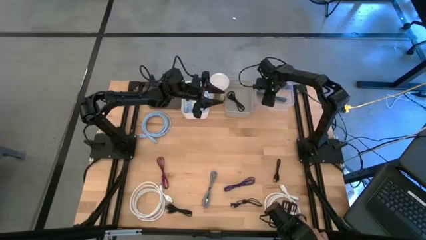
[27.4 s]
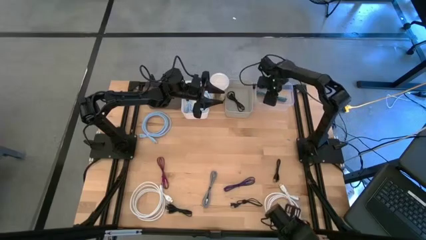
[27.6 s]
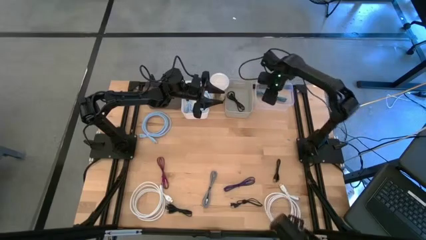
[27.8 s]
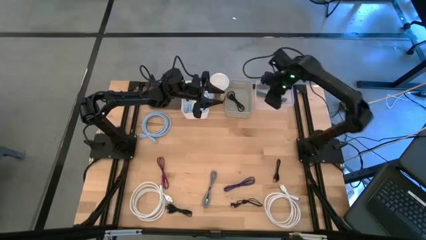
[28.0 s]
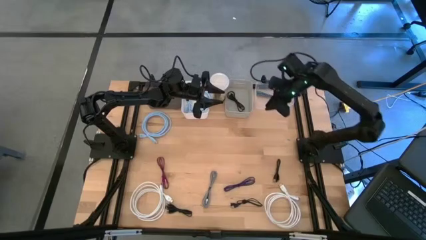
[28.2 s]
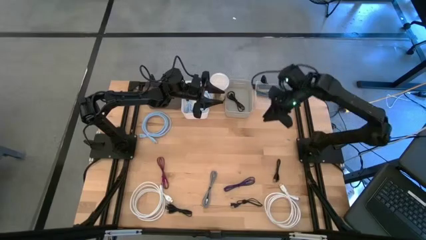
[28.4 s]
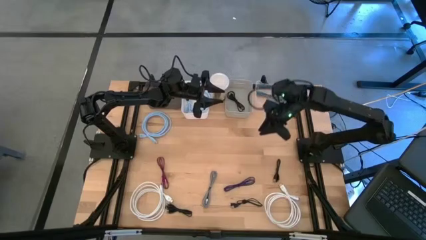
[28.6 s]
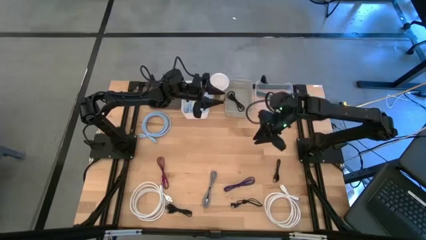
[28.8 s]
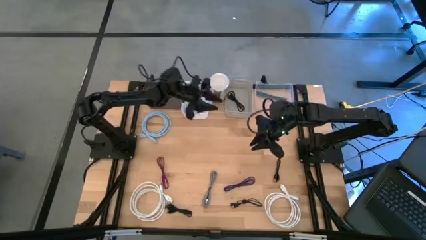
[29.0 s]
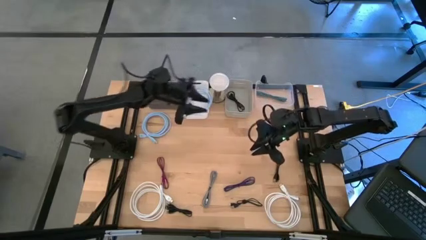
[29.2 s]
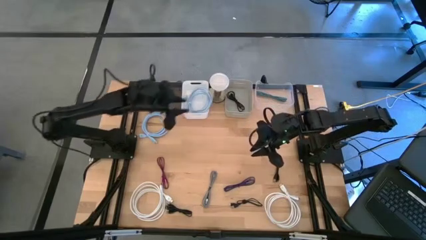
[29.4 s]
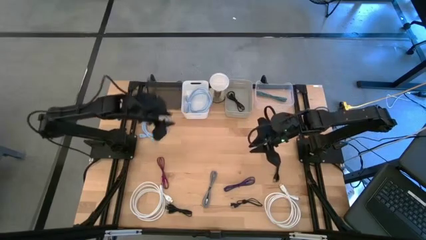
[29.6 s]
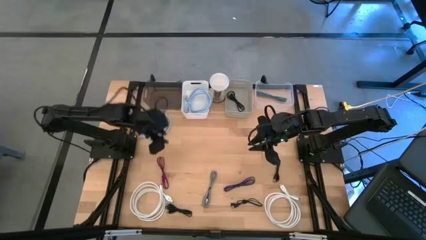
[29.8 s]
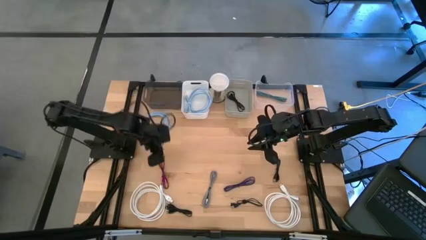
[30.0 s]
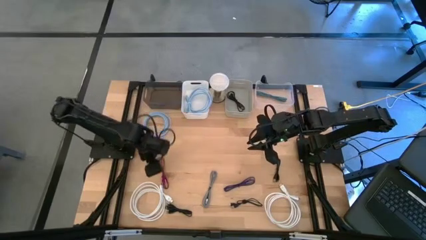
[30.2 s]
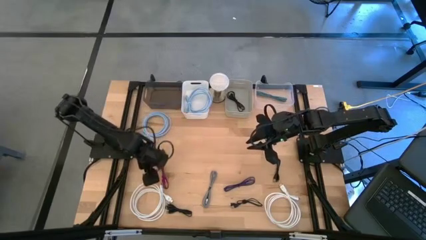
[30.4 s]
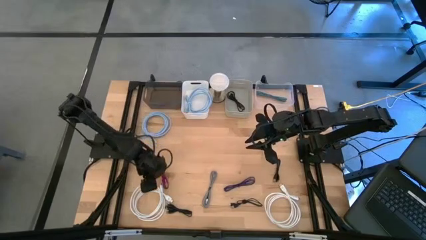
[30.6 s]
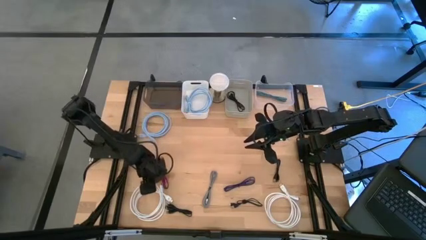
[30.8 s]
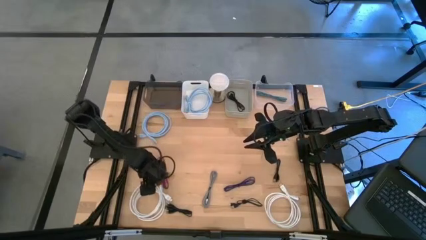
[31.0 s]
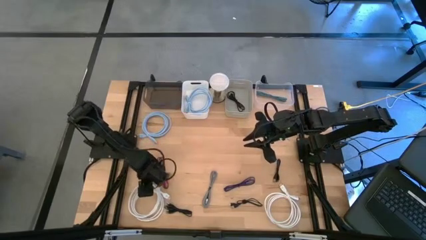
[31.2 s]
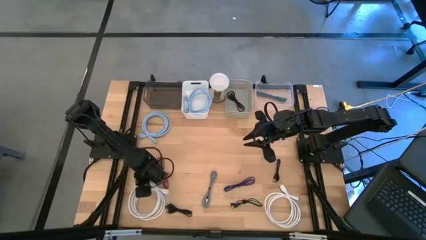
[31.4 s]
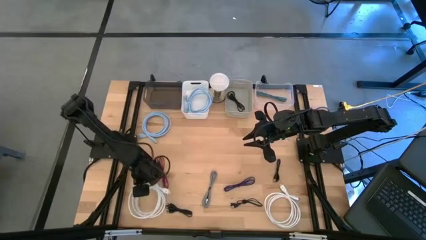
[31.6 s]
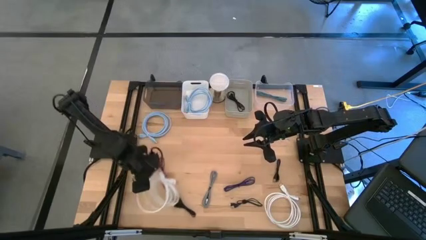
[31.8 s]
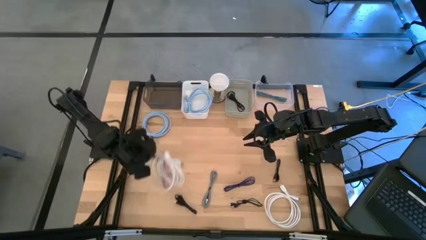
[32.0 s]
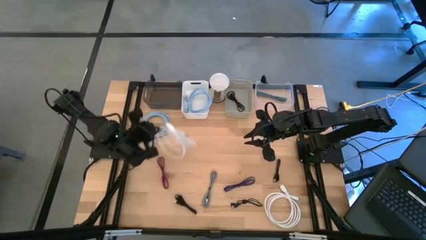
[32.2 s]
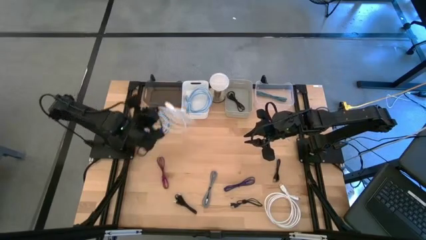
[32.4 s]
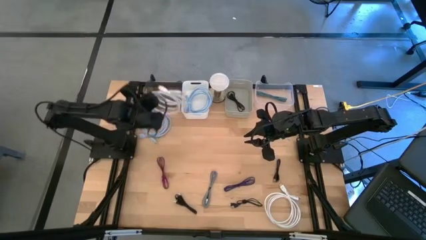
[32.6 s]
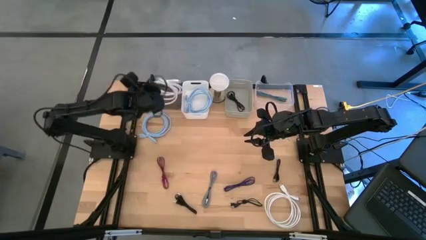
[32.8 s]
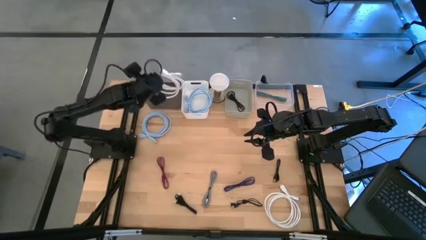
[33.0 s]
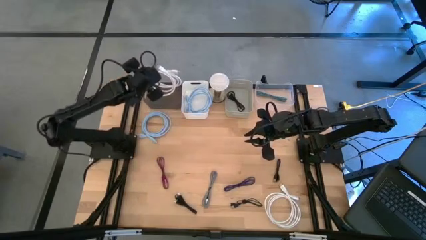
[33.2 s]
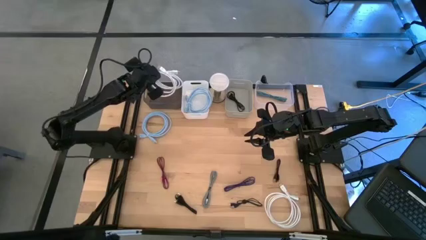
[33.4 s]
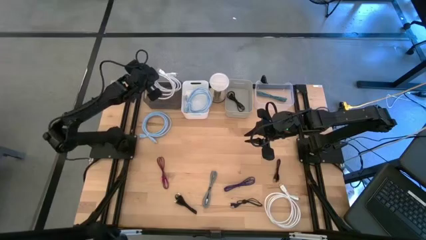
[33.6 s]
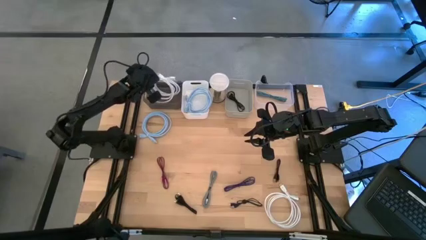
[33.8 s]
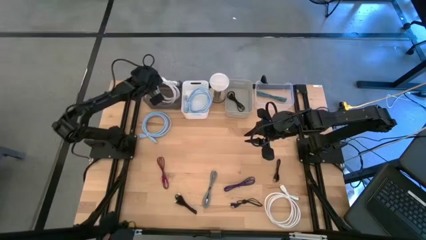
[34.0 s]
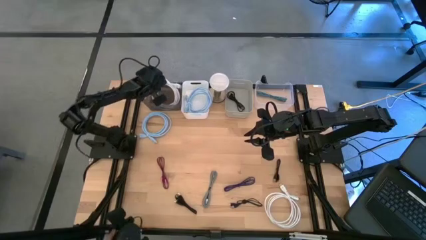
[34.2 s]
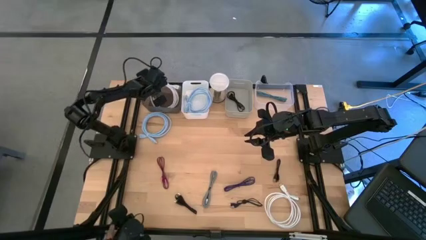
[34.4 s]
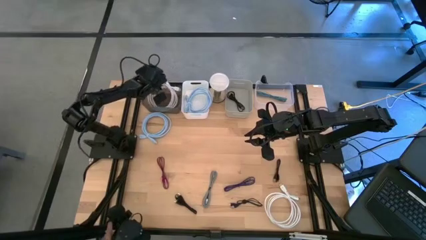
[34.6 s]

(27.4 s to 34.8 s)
Task: Pick & Place USB Port
Put the white HDMI cable into the black bin
